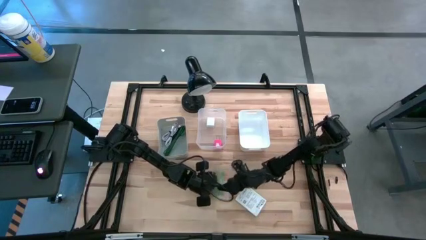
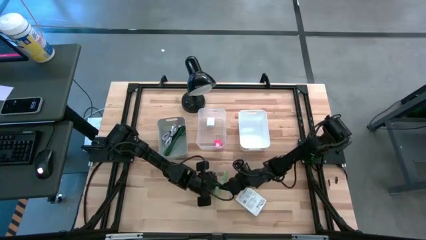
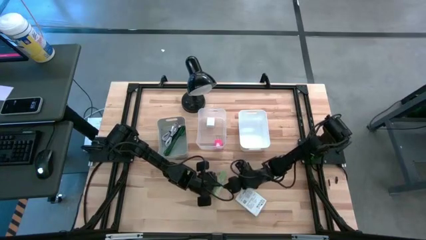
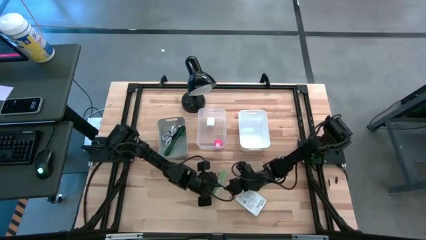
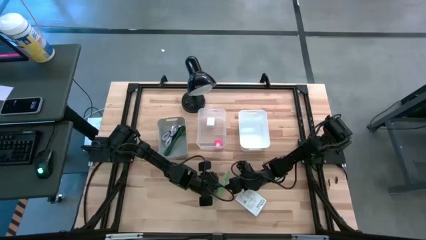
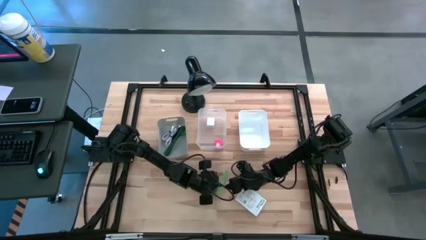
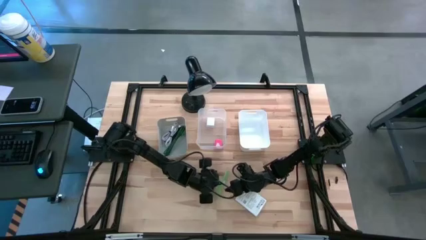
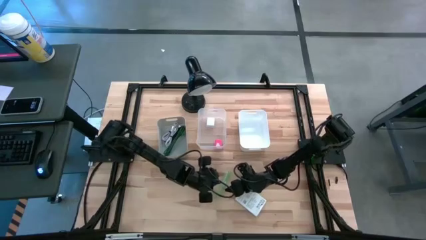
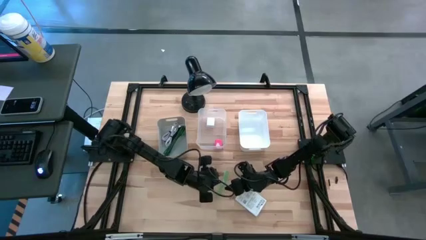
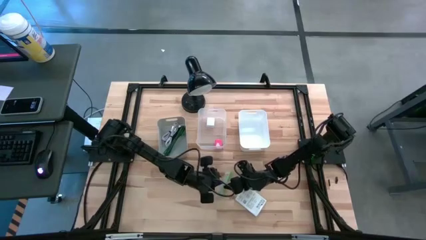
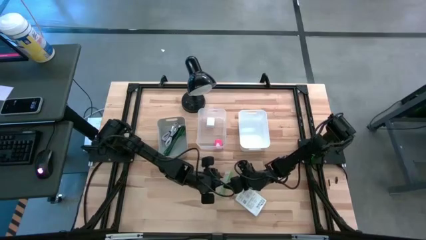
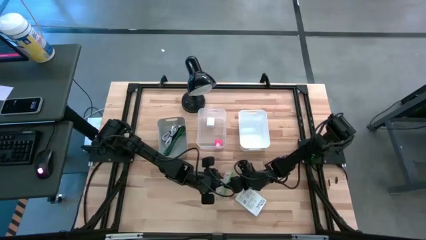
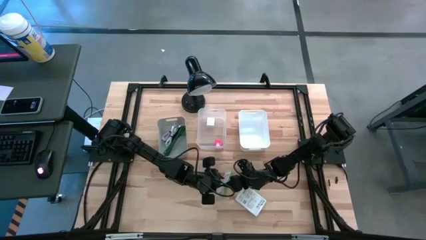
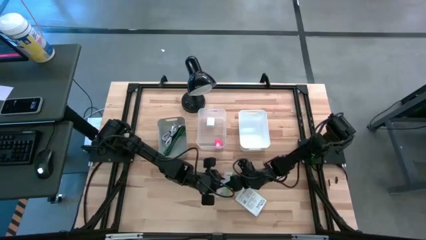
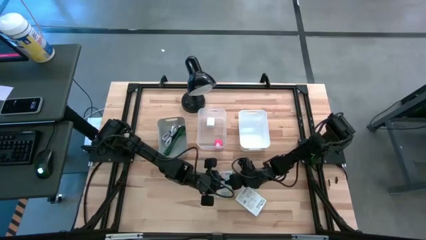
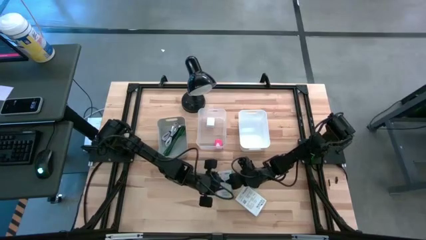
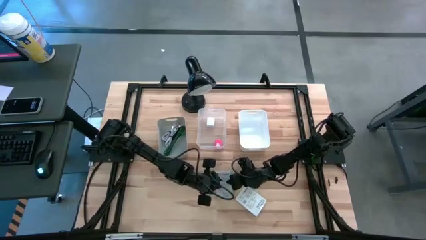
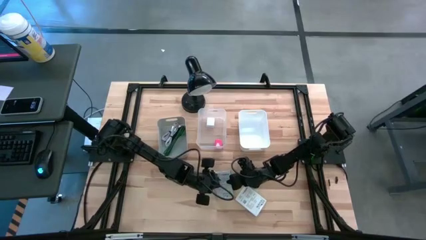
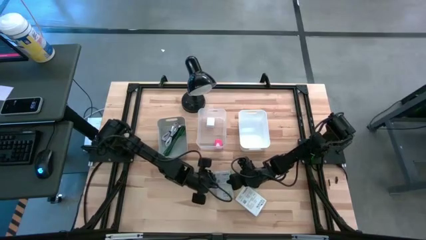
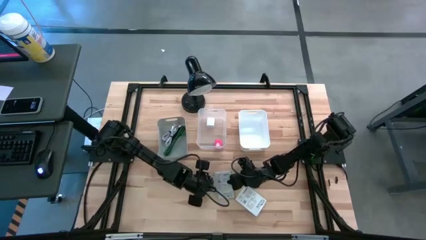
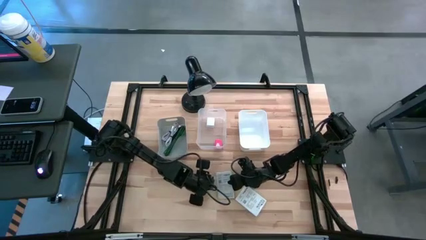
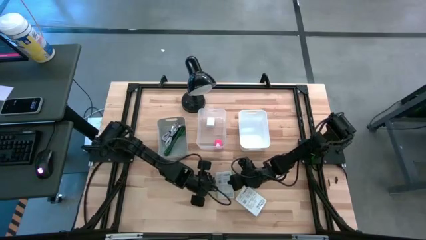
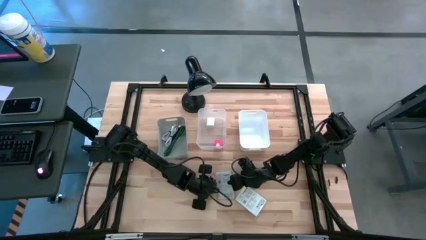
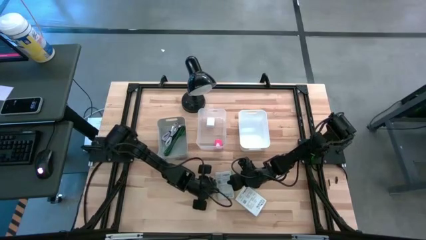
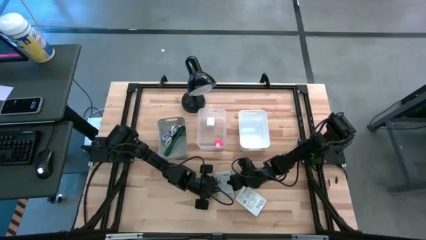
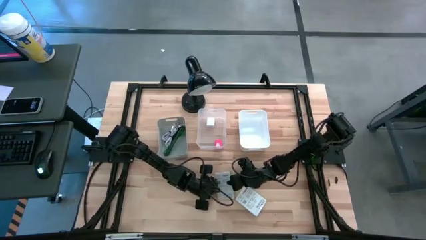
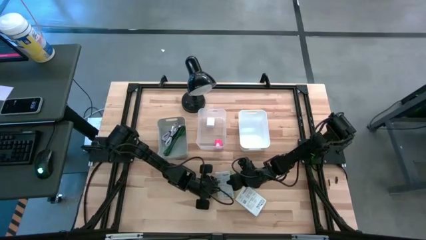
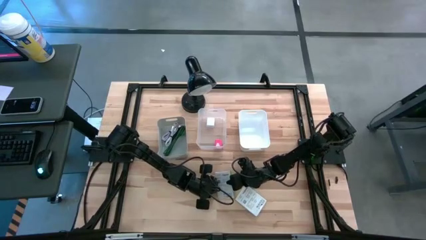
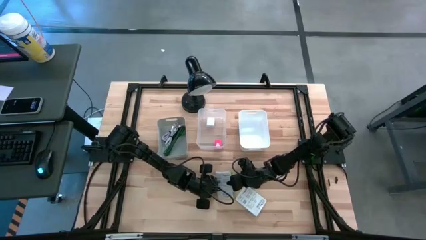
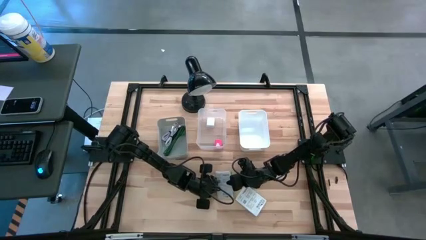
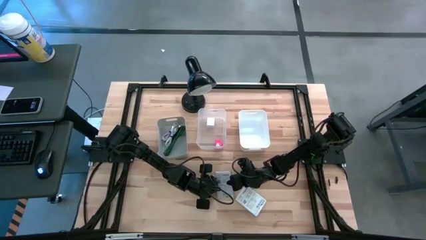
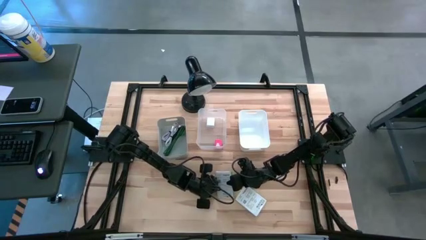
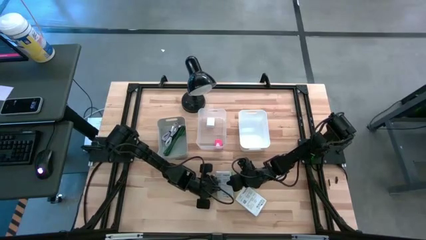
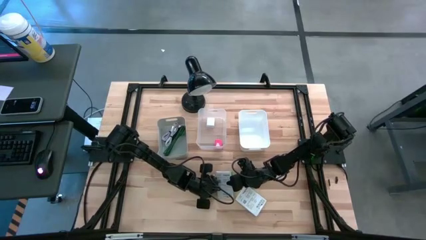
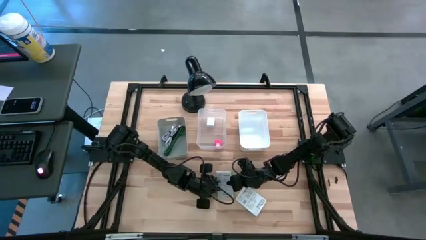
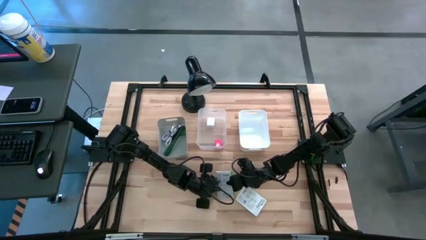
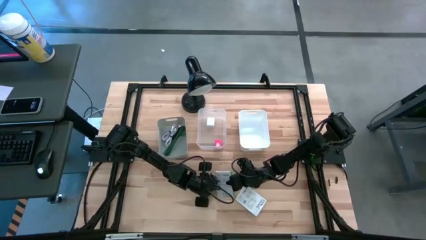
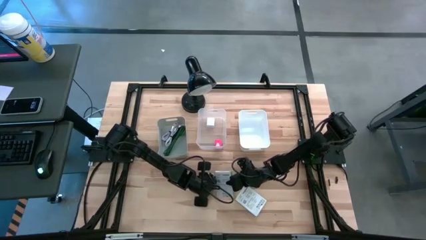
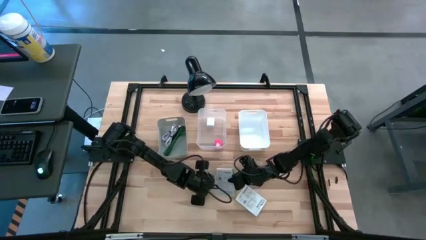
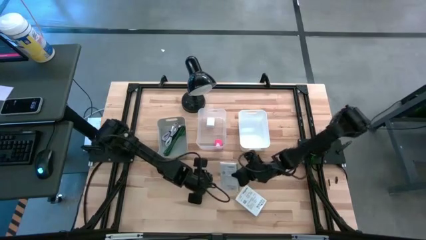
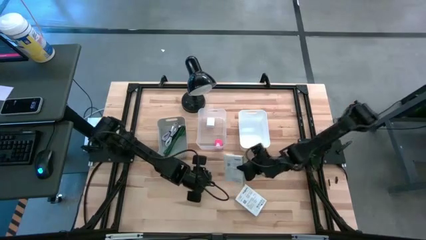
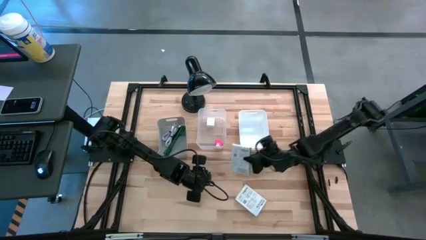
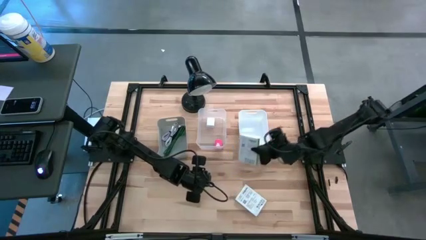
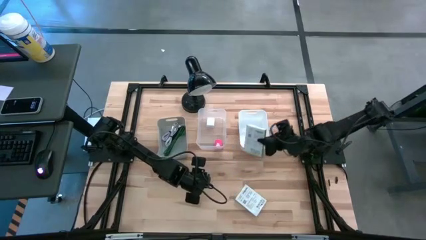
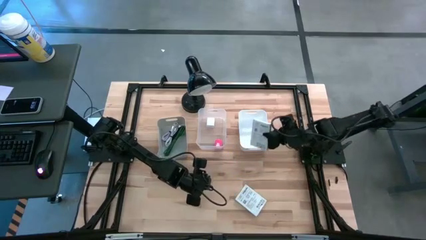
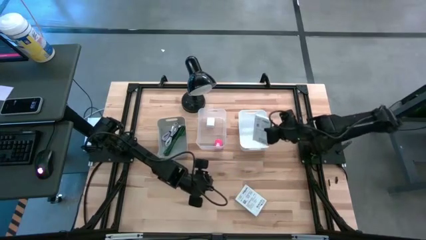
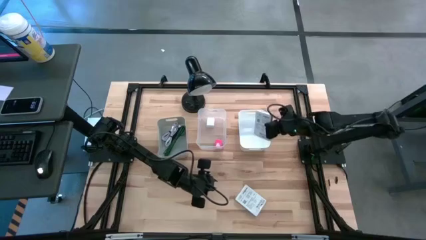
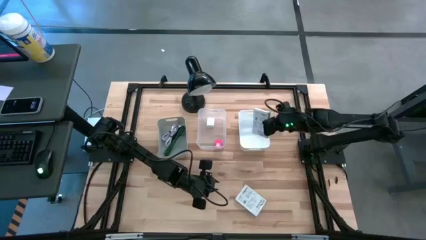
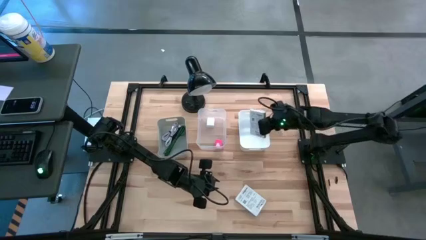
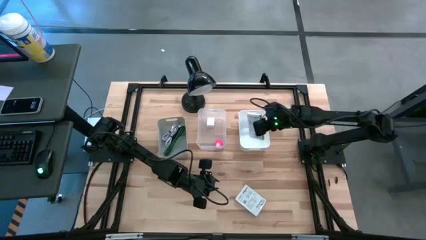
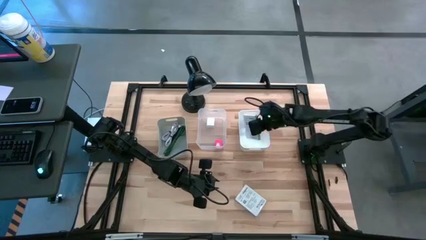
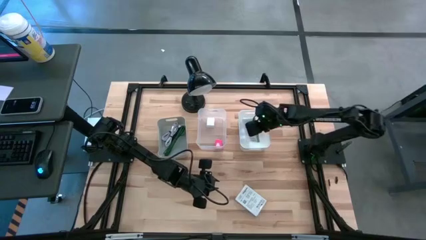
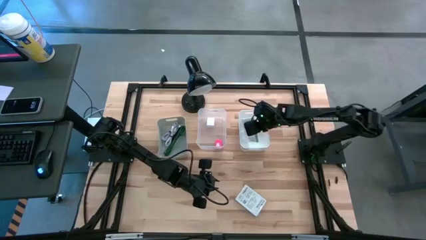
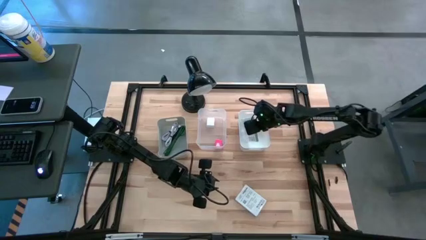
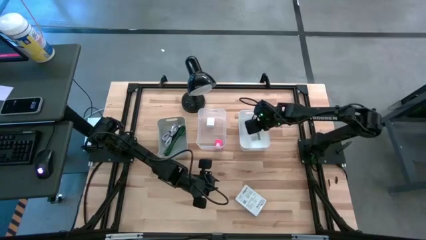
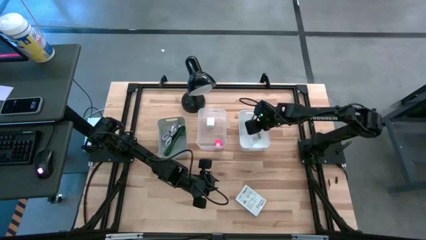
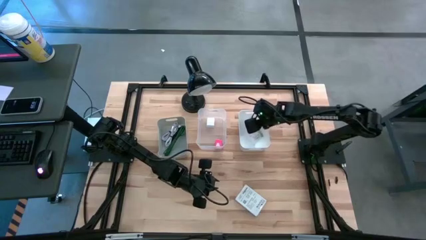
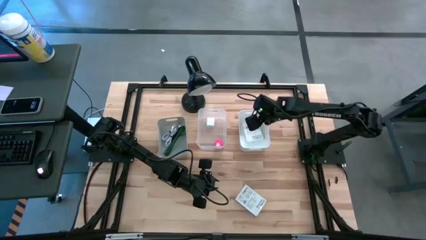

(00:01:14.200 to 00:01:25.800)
Task: Pick and place items into bin
Put the left white box into the white bin

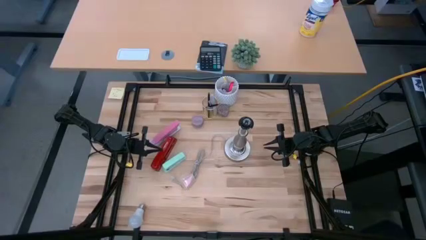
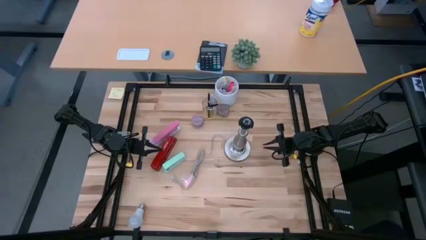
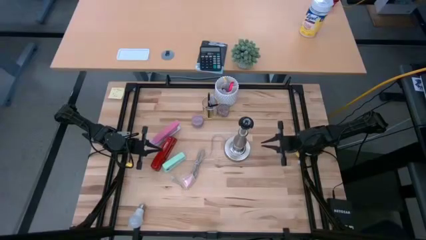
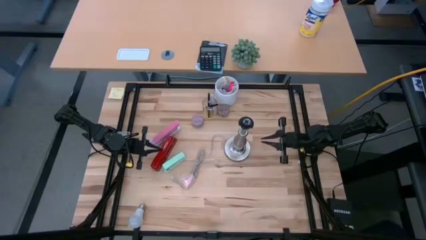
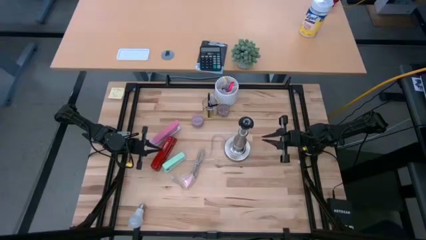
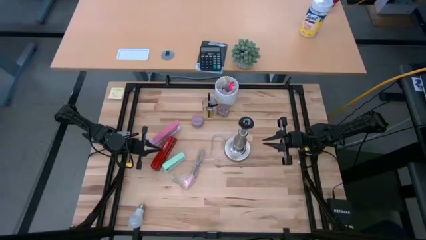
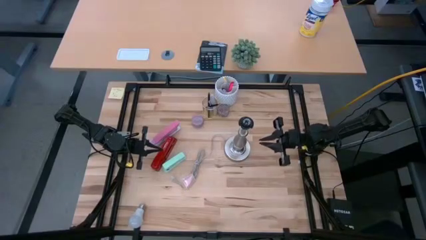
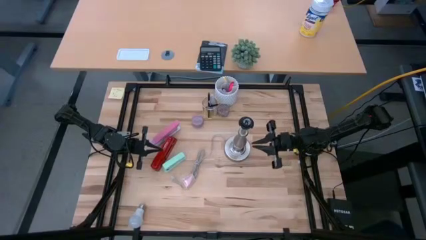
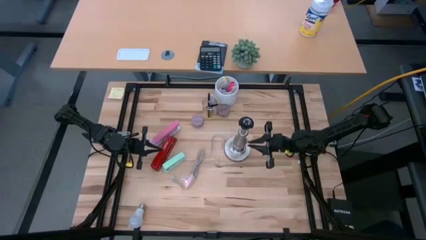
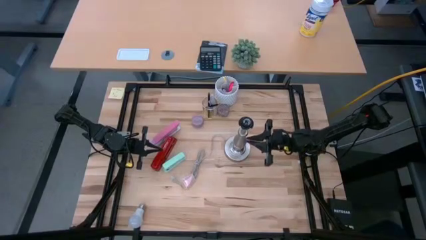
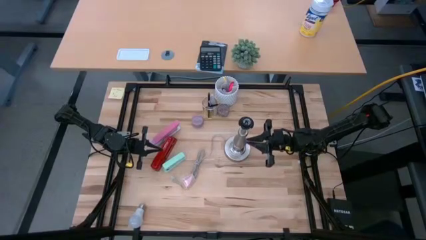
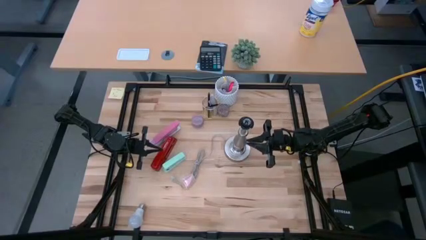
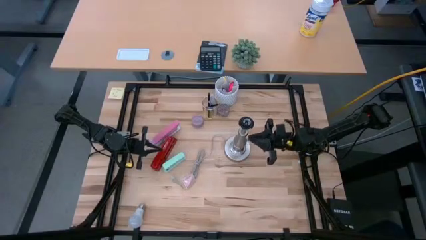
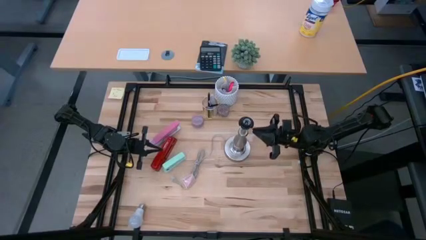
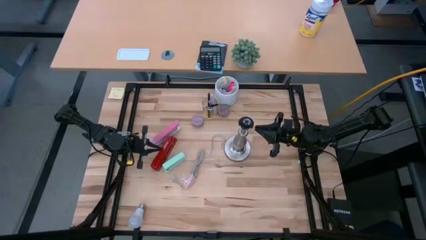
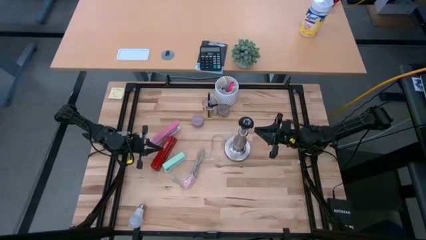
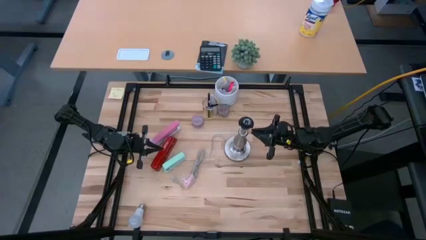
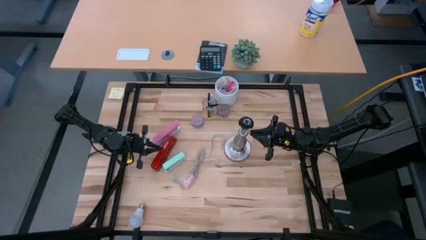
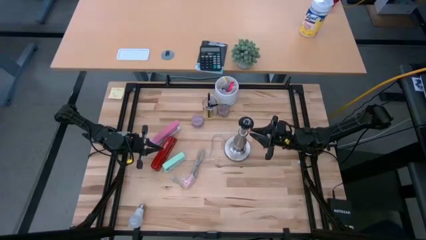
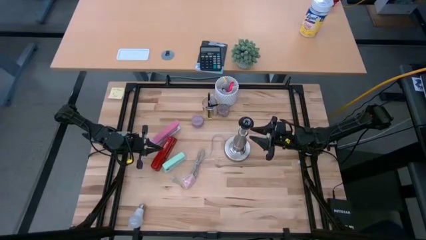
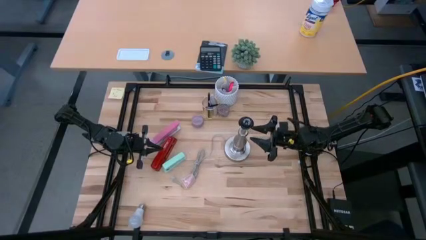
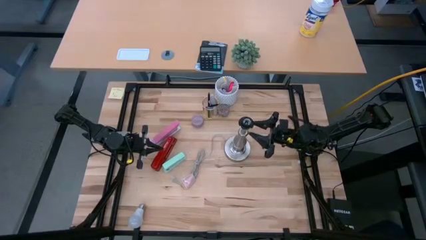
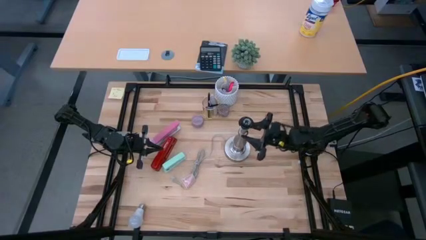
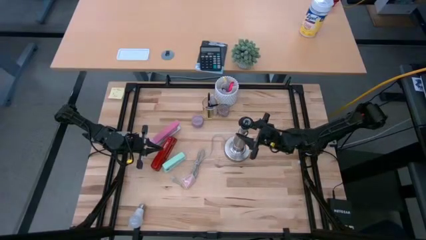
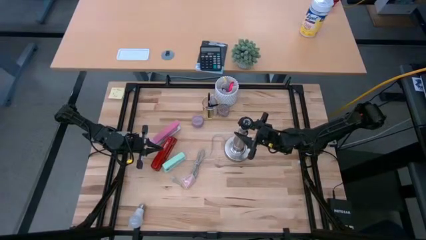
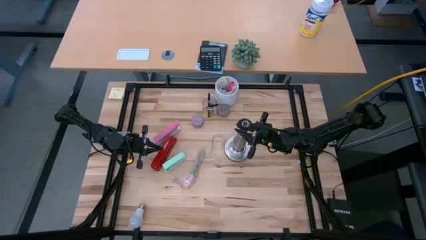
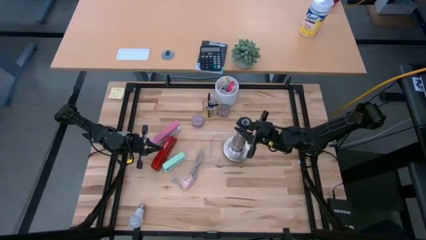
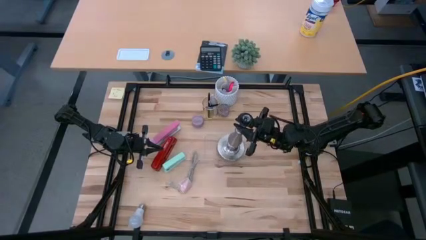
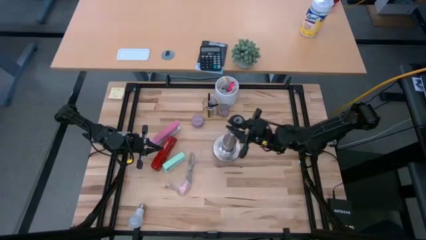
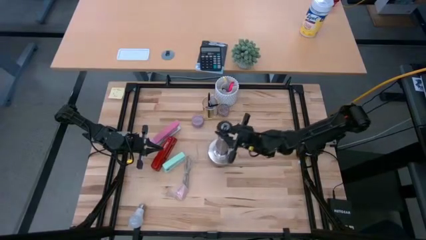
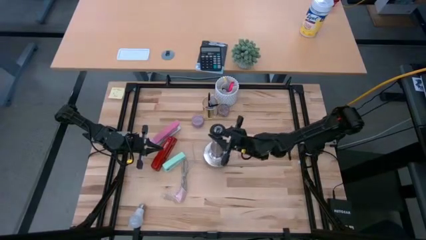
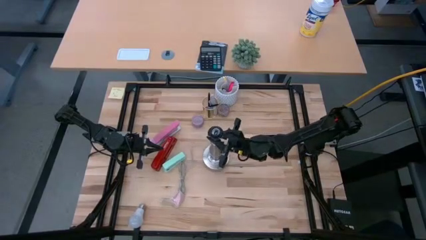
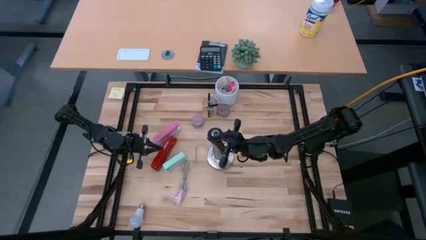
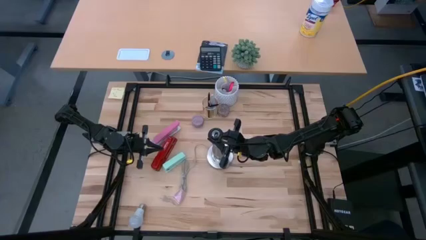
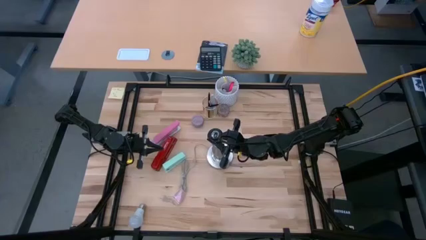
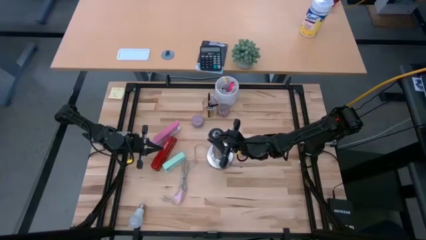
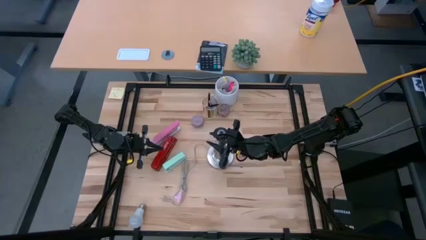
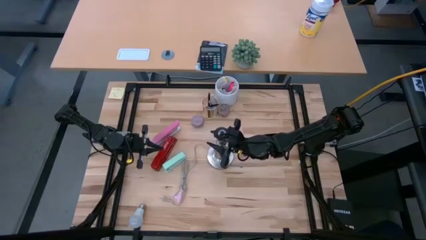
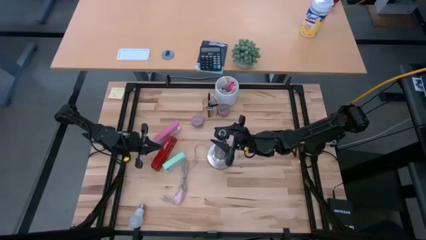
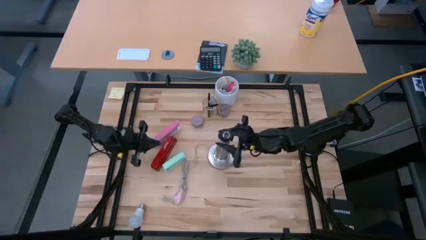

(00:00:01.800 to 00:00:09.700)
Task: Screw lightbulb
Adjust the lamp
